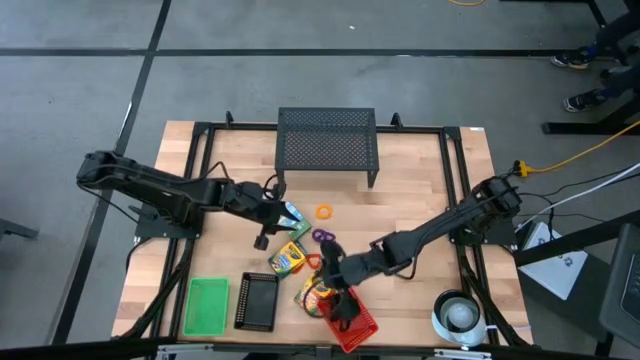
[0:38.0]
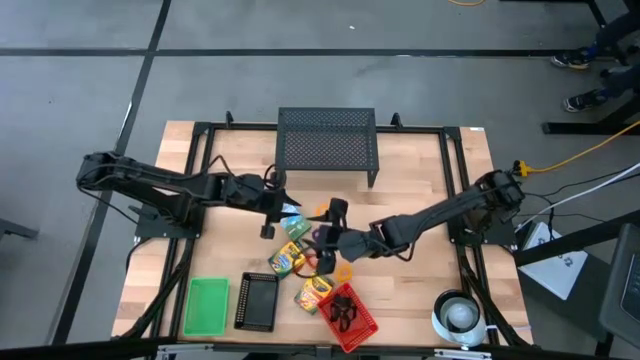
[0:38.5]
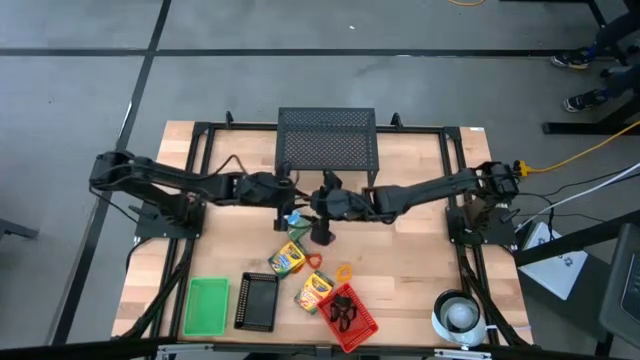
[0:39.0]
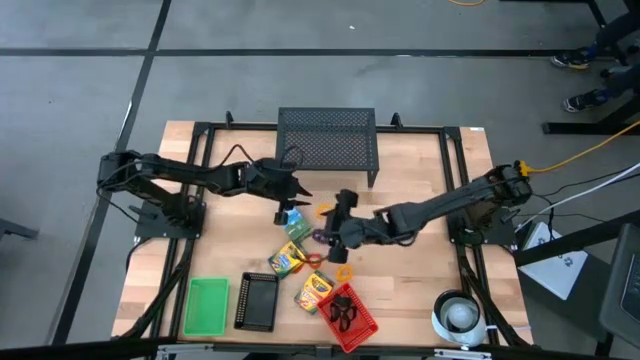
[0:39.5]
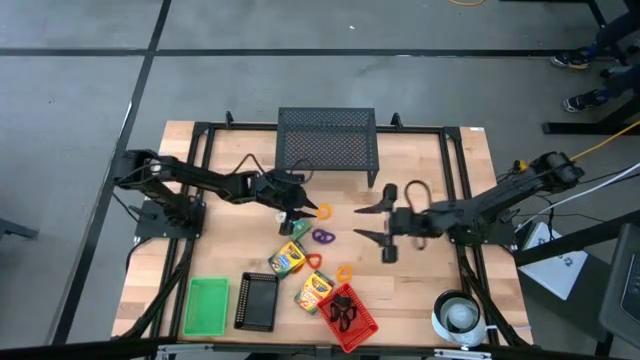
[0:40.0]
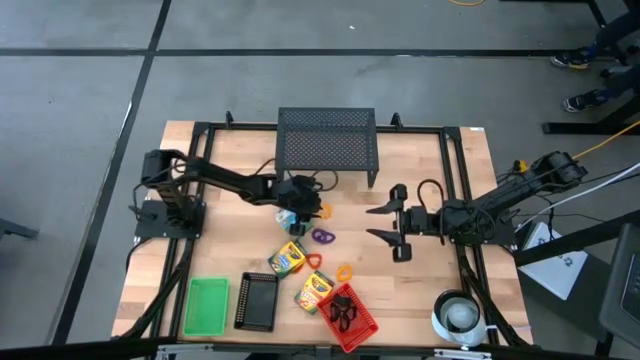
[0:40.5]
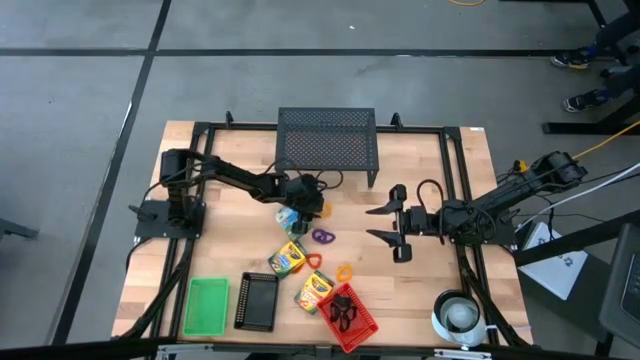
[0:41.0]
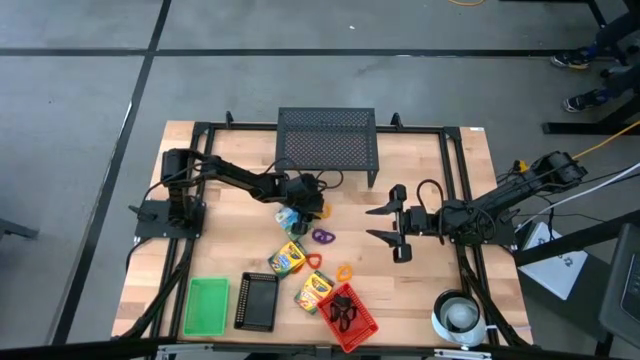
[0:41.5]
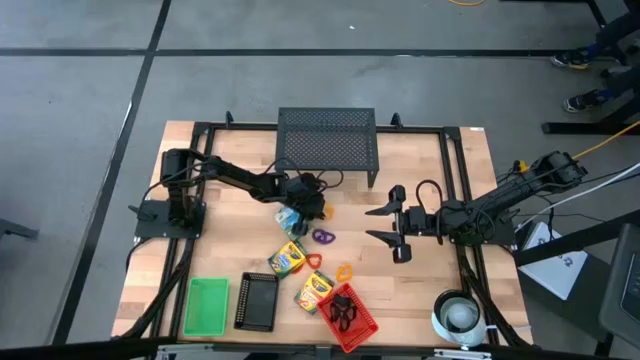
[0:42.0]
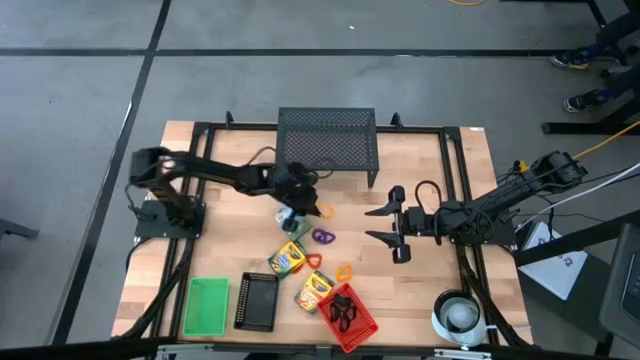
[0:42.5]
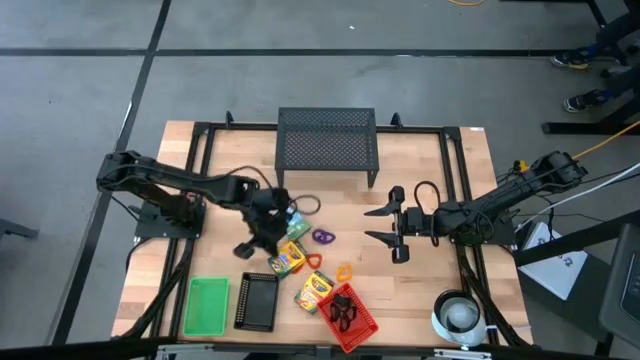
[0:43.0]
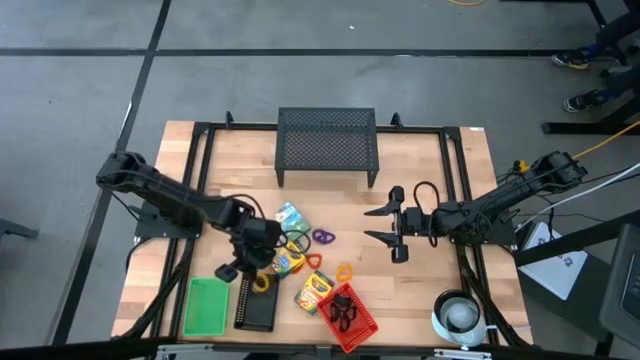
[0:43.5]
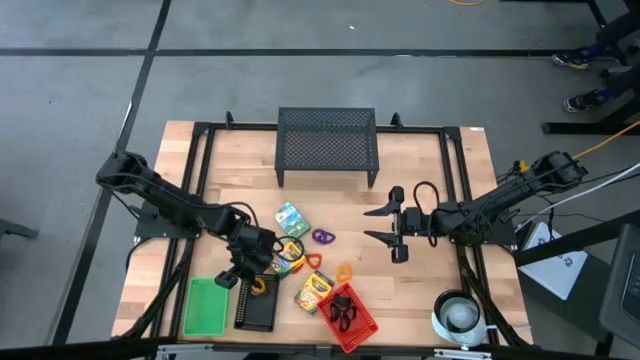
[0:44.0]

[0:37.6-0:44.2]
Task: Pick & Place Office Desk Supplies
Put the yellow spring keychain into the black bin

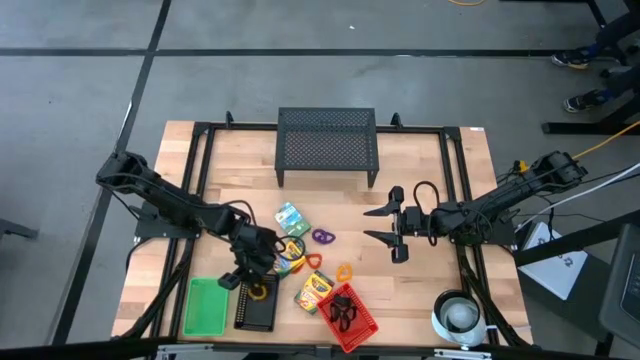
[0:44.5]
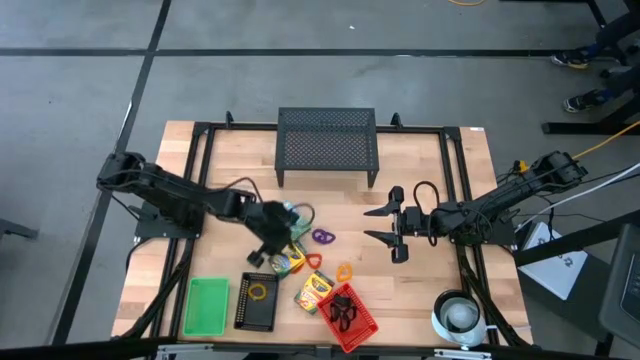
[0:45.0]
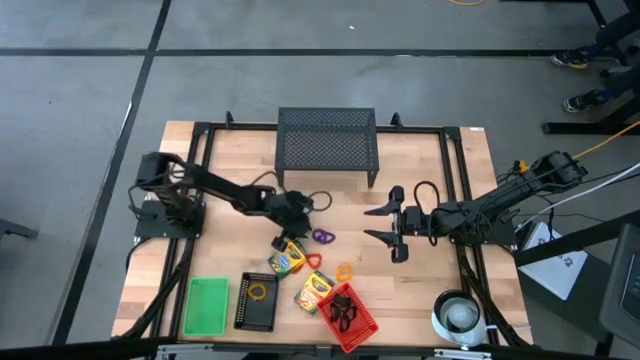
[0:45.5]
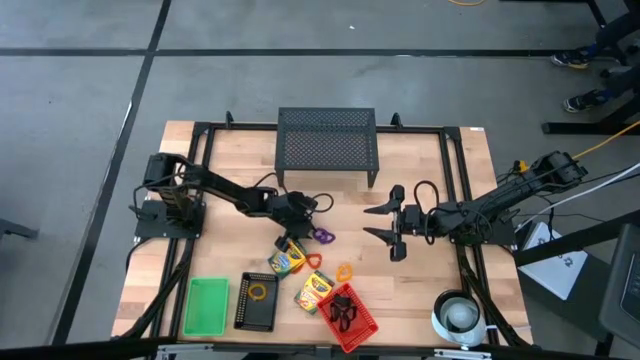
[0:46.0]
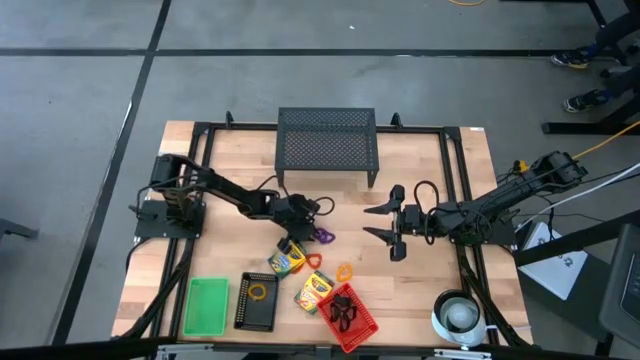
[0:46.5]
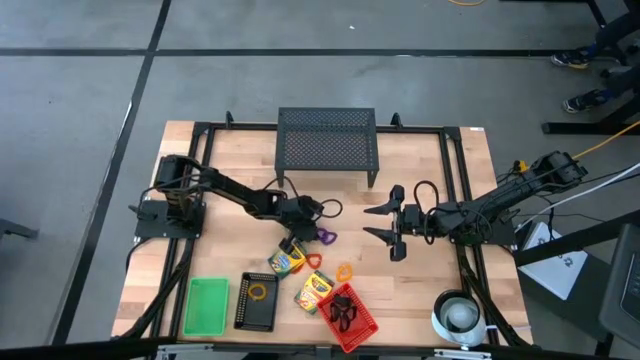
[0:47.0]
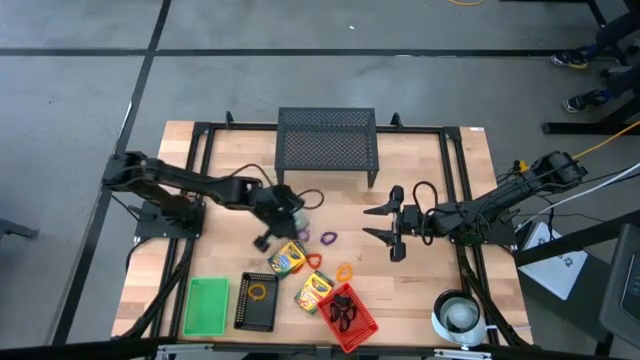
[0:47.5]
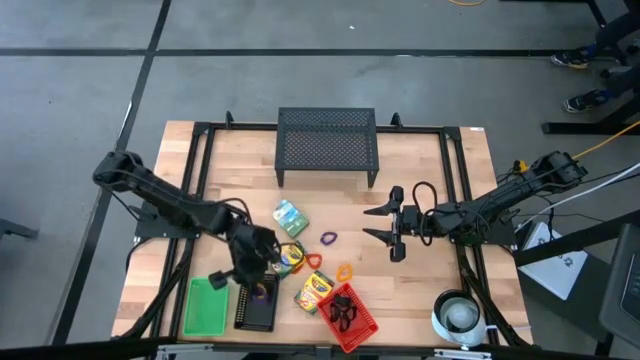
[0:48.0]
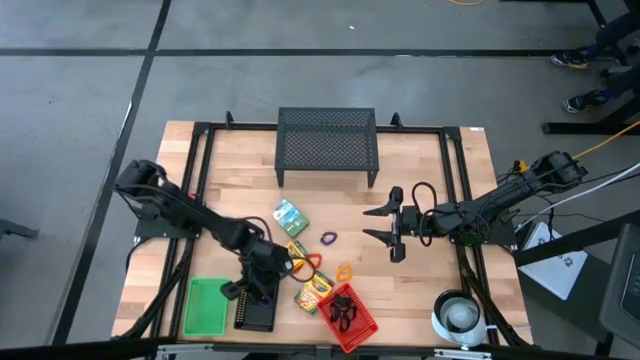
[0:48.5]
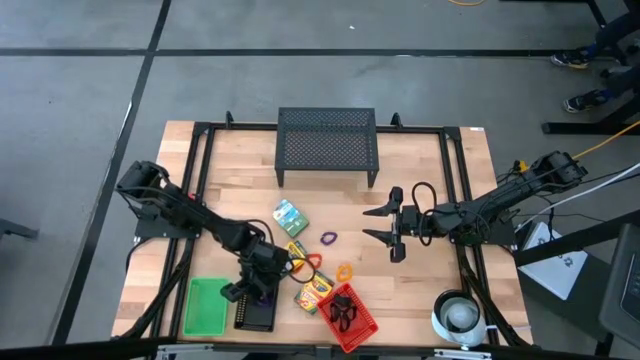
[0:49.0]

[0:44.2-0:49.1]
Put the purple spring keychain into the black bin

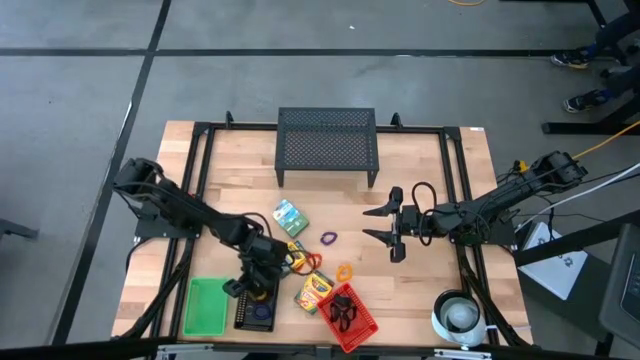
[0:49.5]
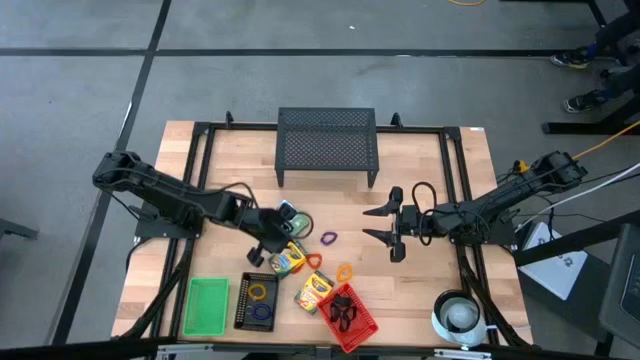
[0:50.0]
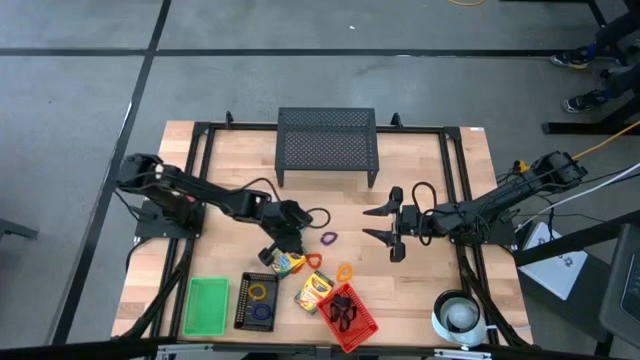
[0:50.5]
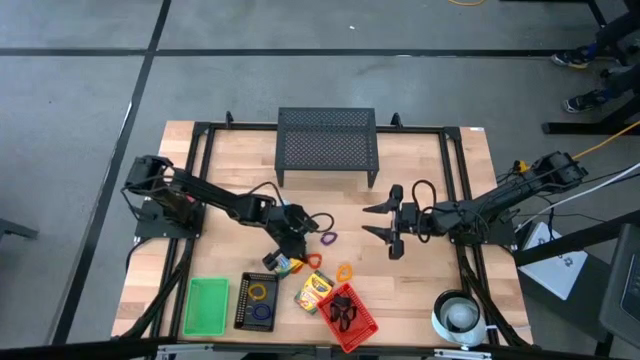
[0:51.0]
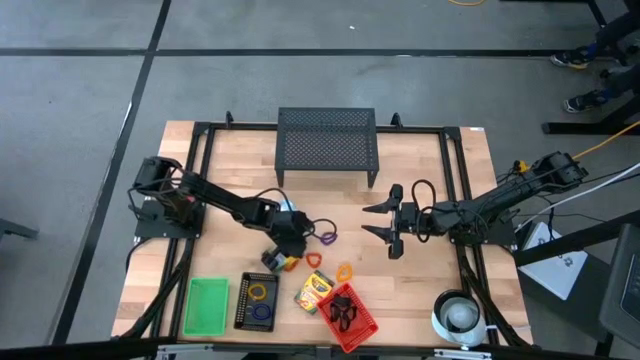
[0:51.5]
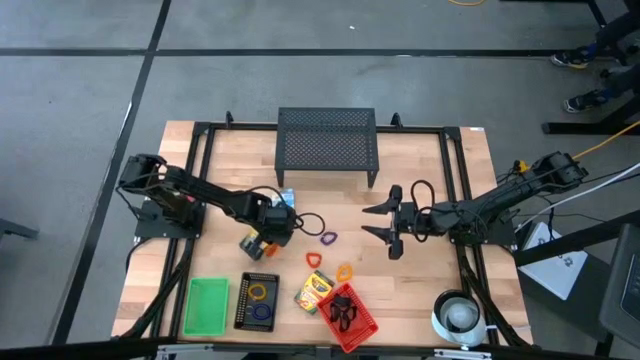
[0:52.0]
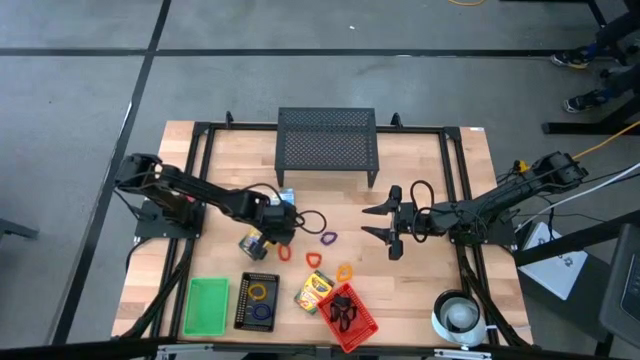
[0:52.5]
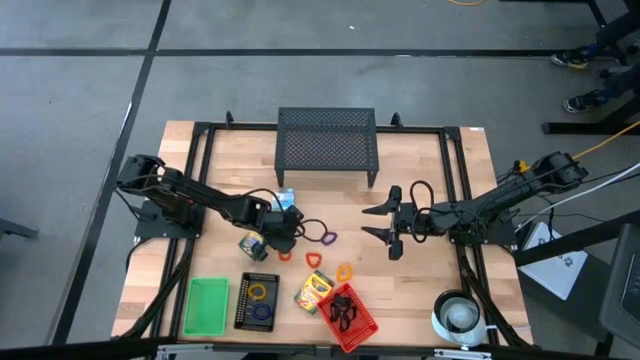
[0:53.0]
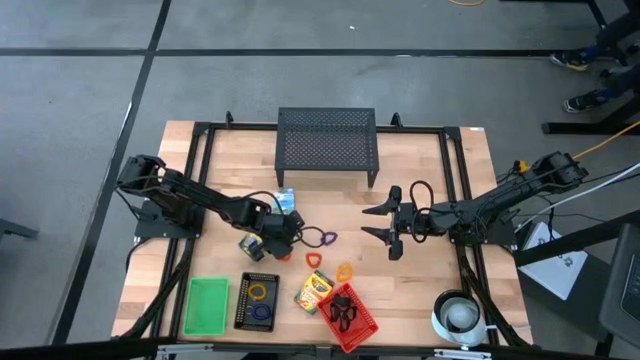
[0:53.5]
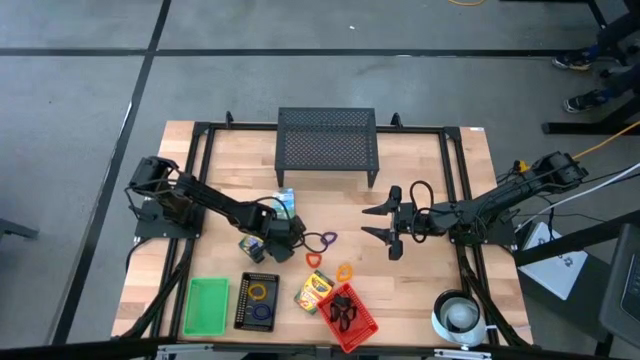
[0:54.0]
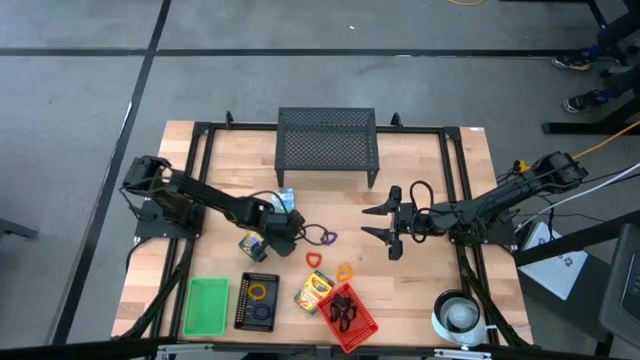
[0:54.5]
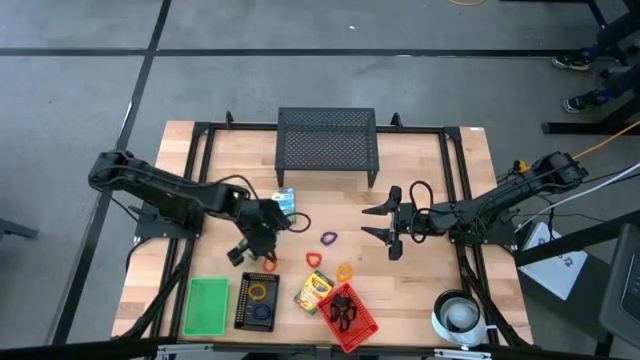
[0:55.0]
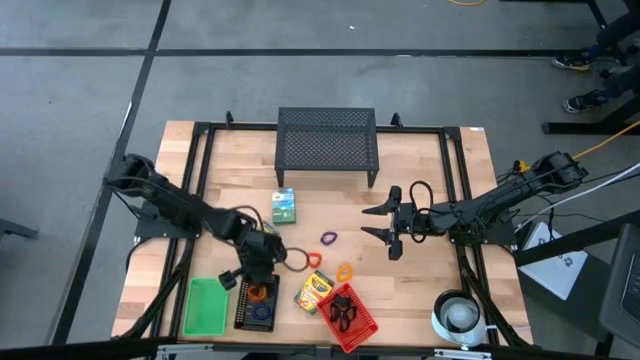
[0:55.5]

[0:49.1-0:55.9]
Put the red spring keychain into the black bin

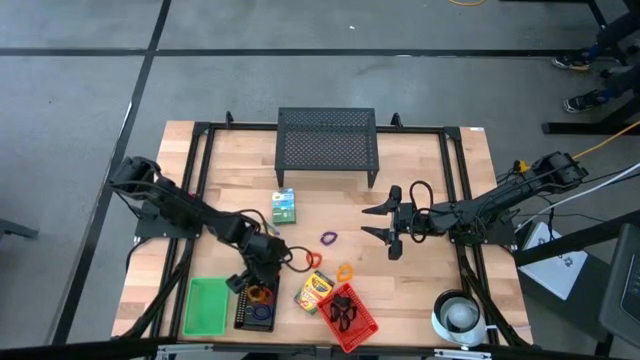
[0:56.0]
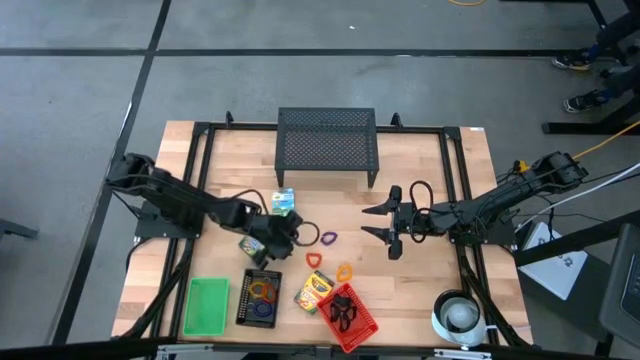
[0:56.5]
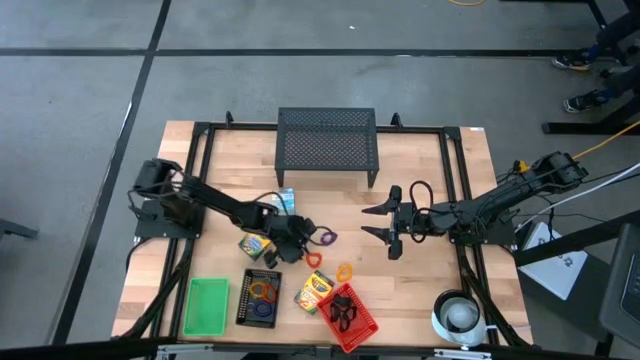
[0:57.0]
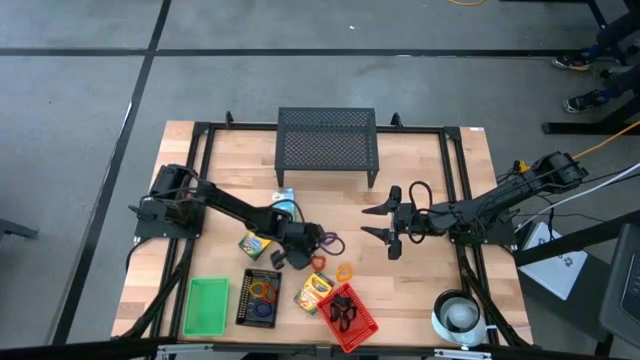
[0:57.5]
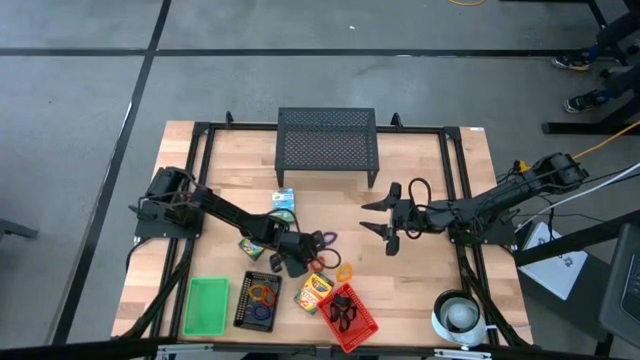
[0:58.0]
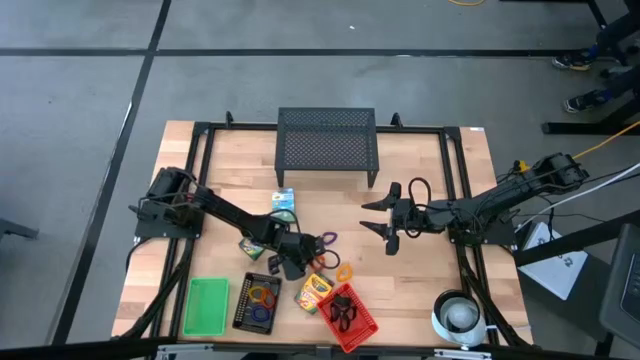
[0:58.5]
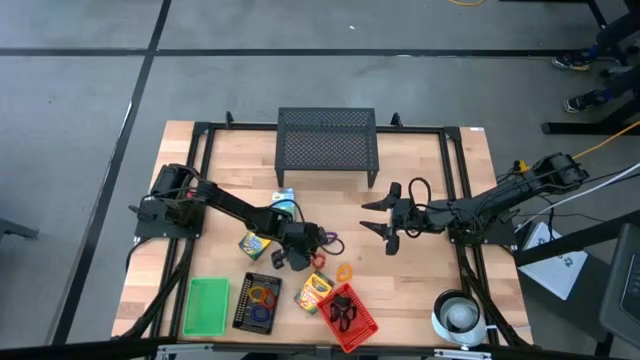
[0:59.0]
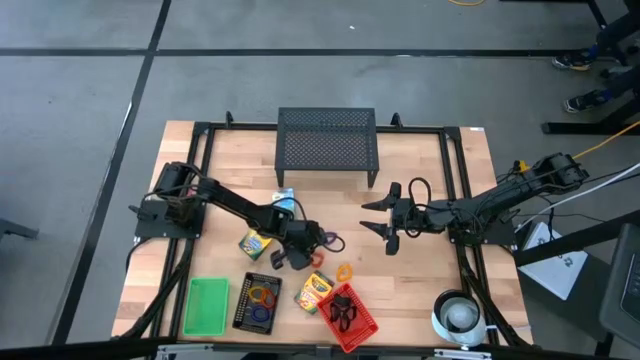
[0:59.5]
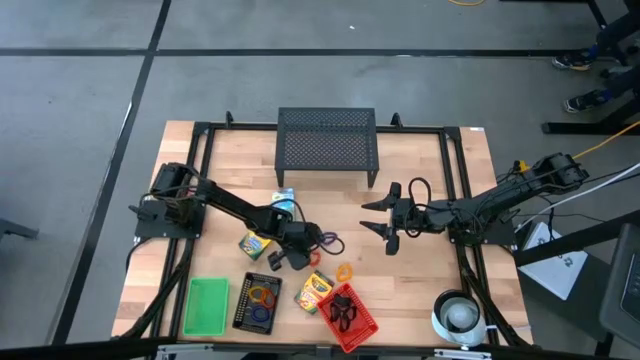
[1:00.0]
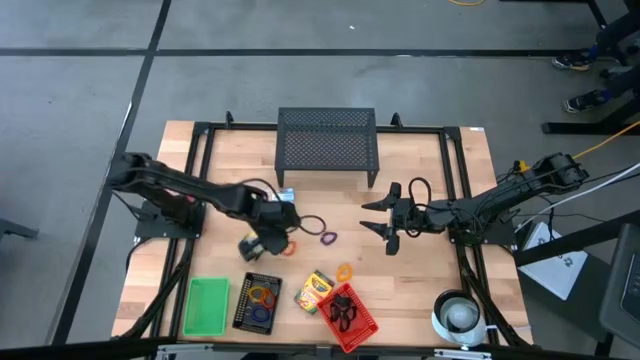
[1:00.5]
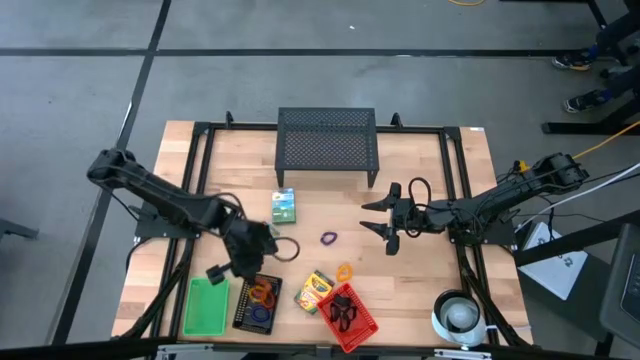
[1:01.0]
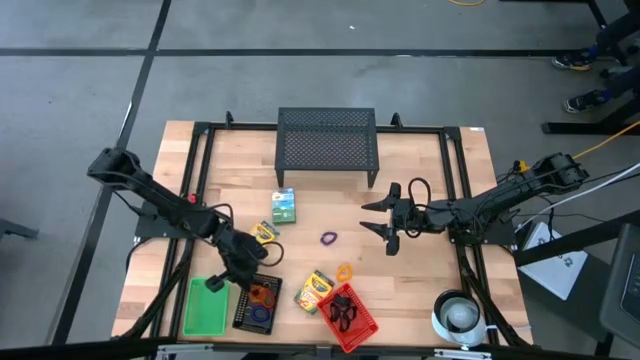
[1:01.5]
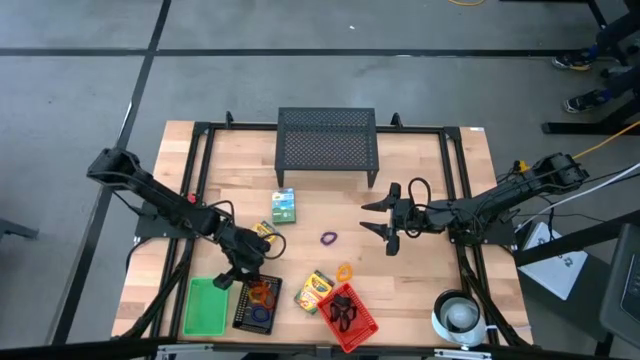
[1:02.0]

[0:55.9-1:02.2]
Put the red spring keychain into the black bin
